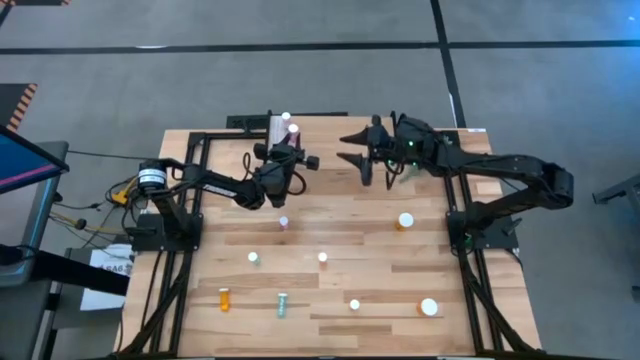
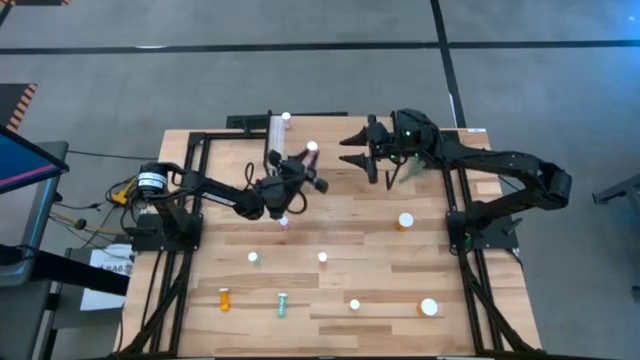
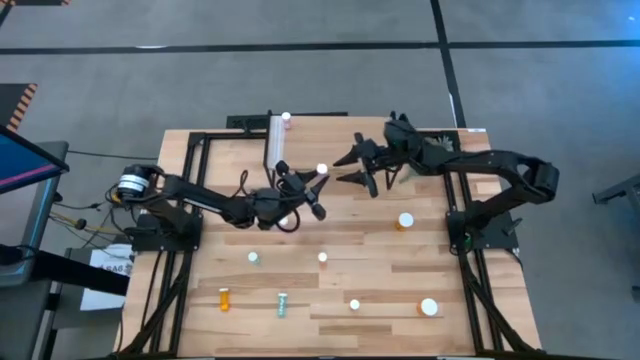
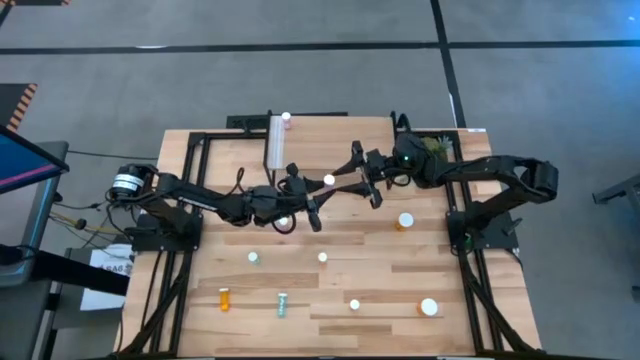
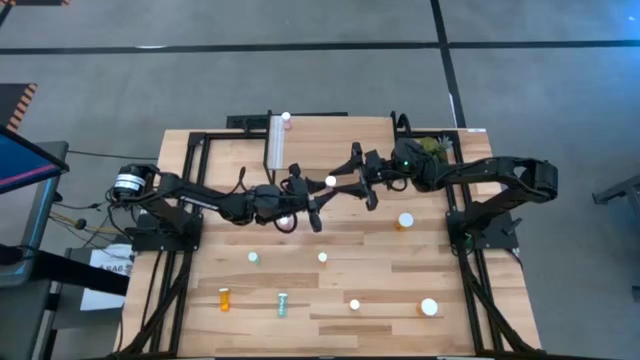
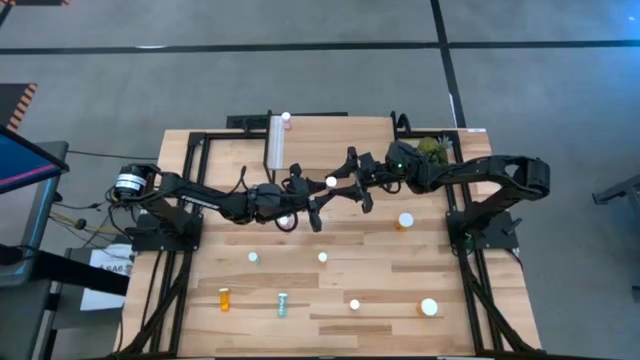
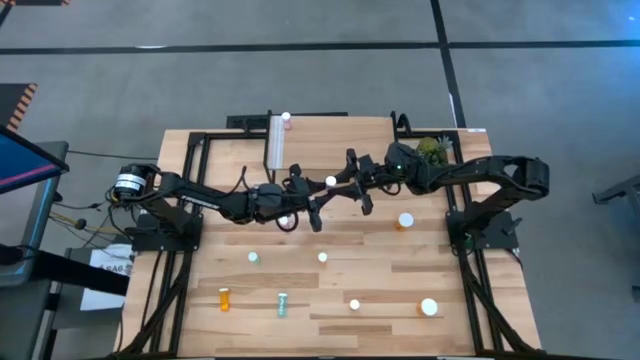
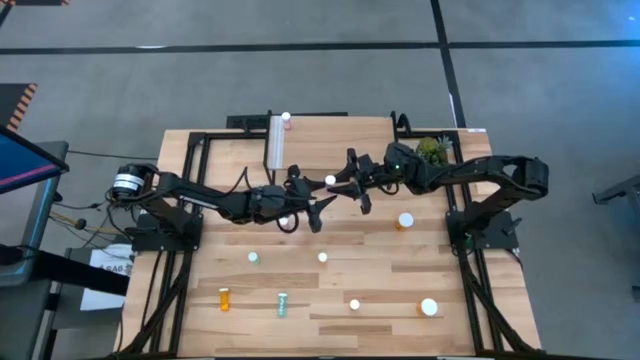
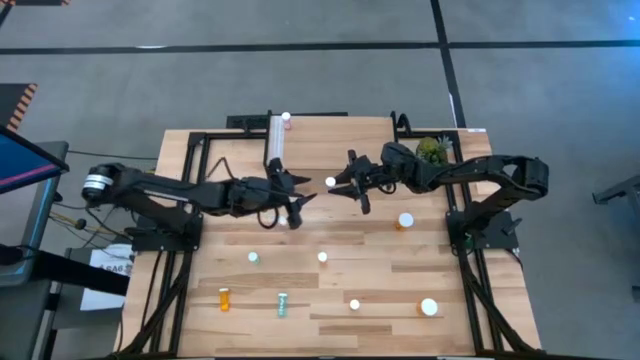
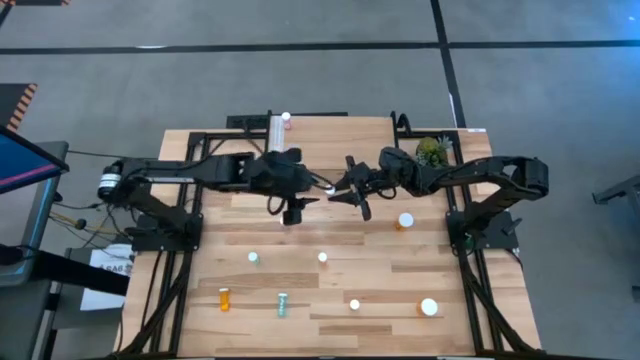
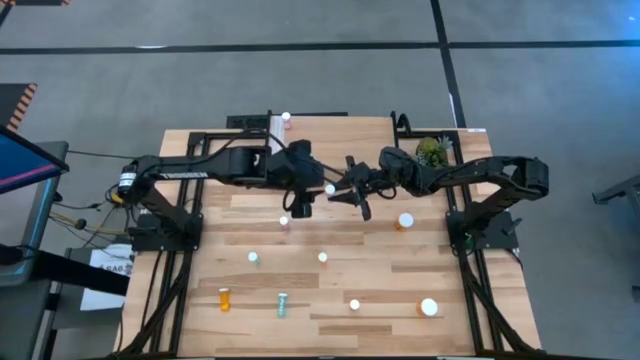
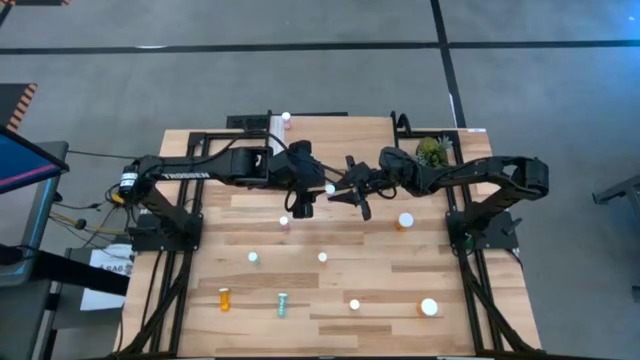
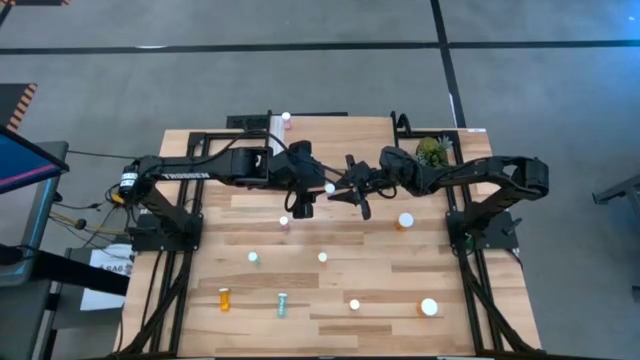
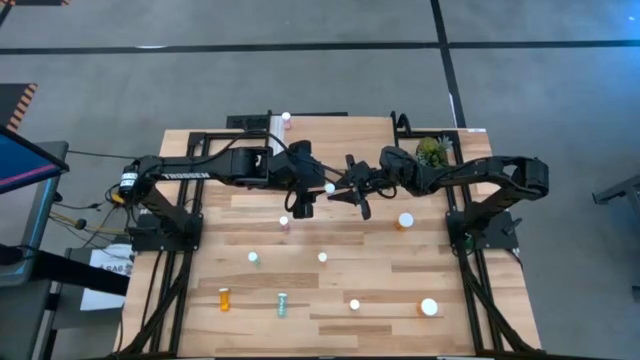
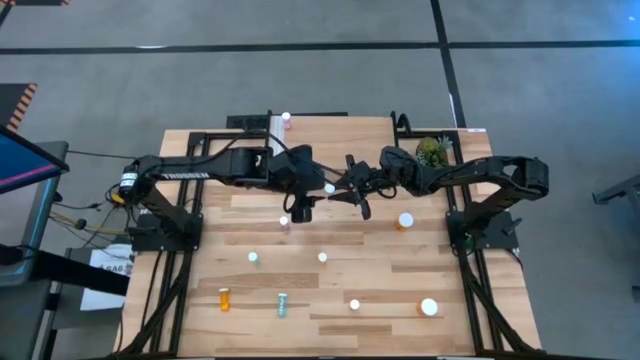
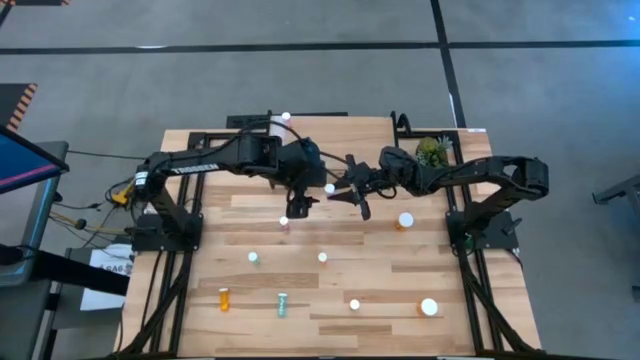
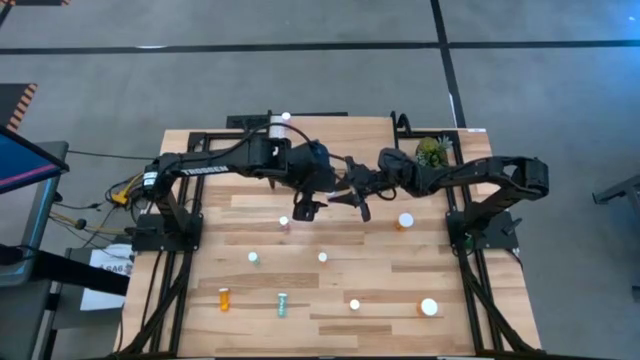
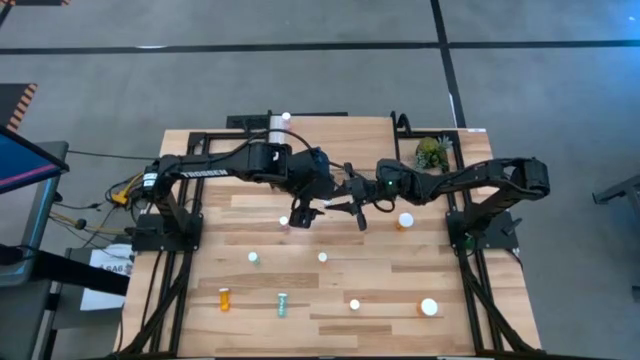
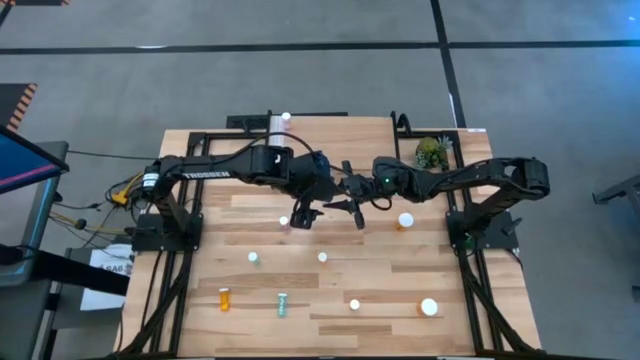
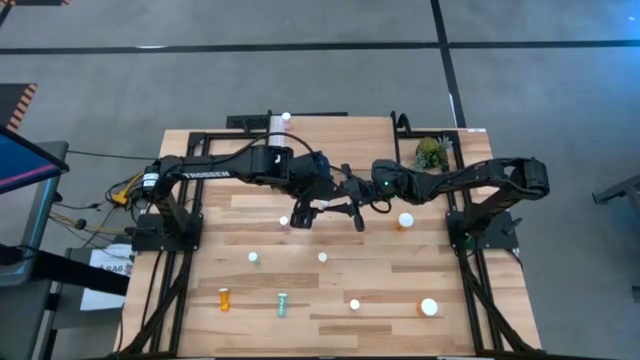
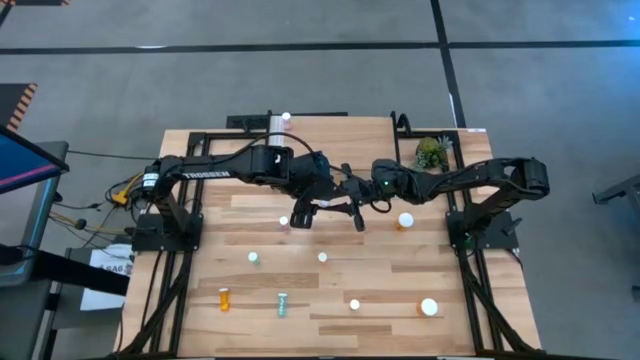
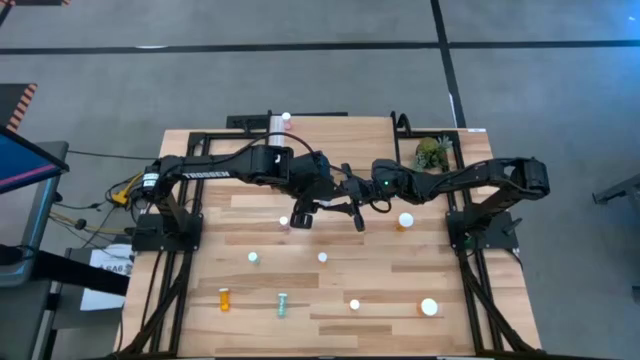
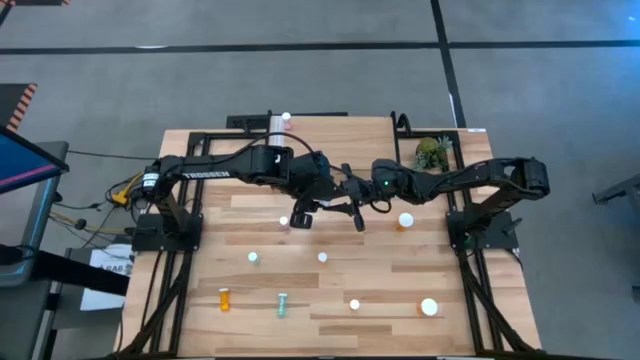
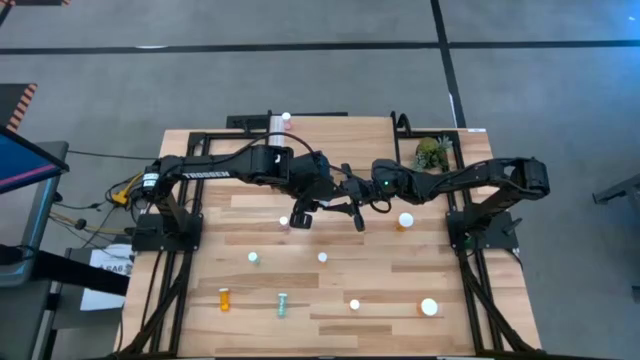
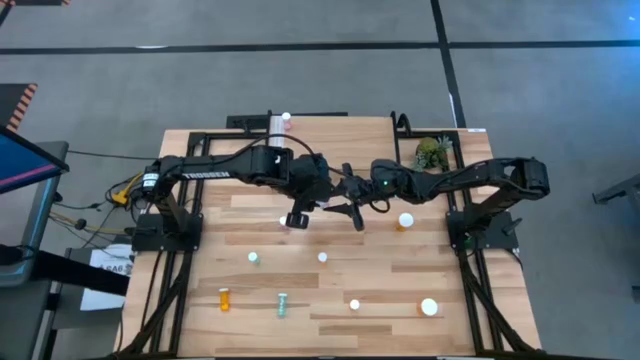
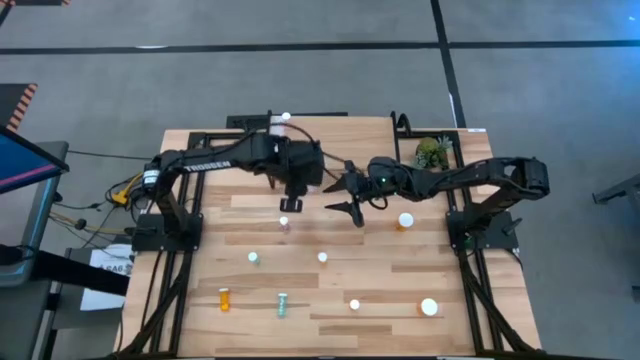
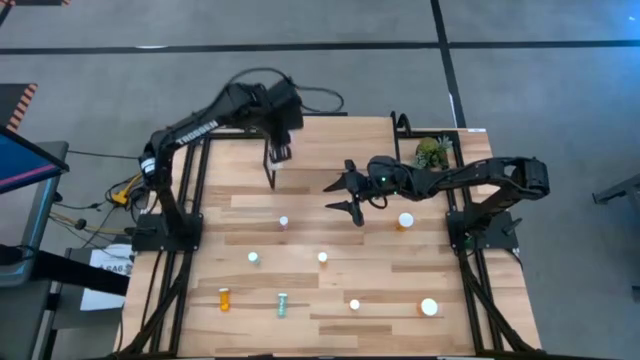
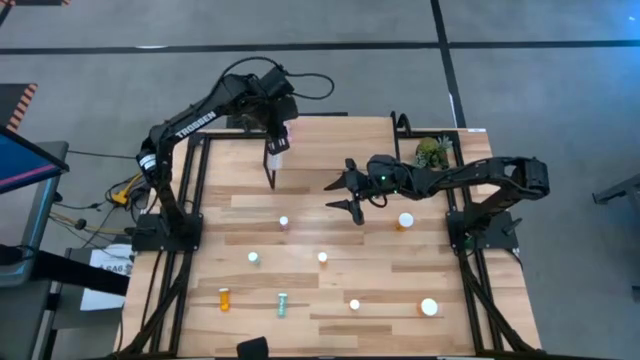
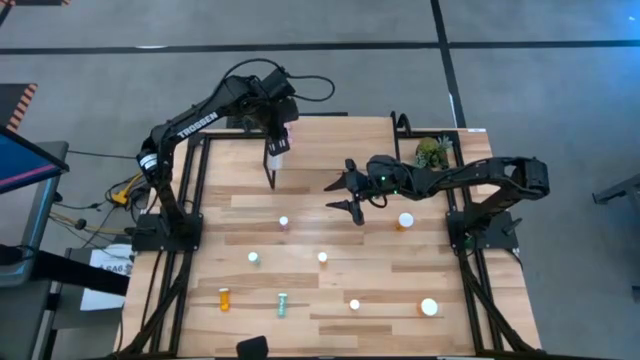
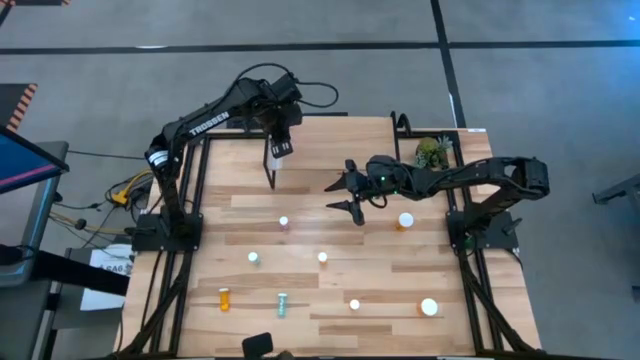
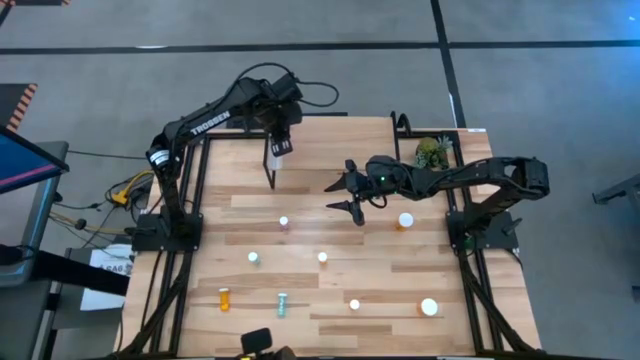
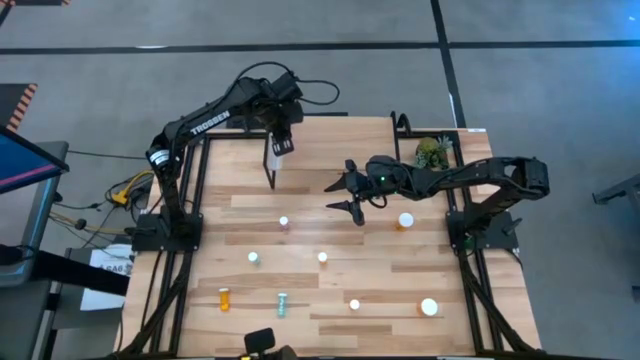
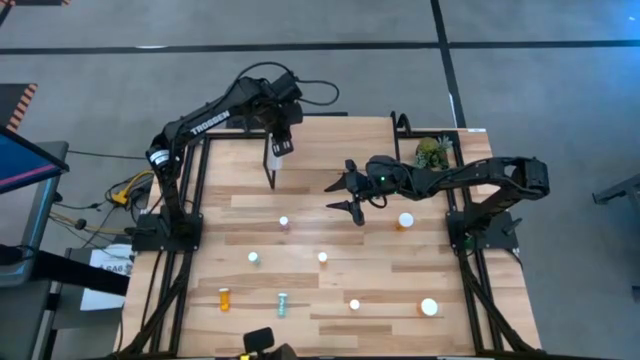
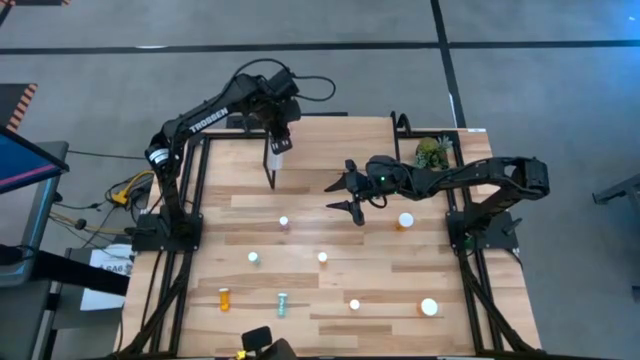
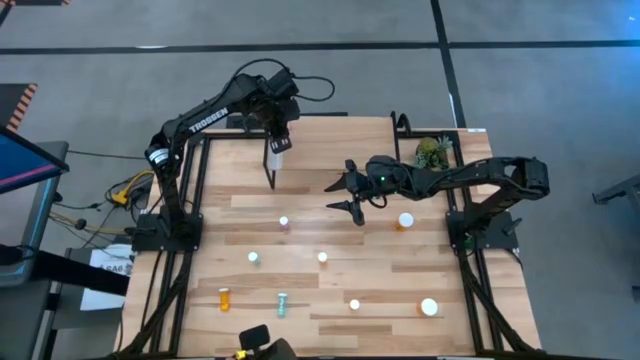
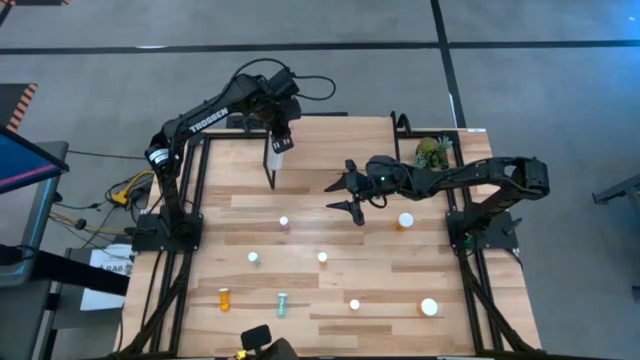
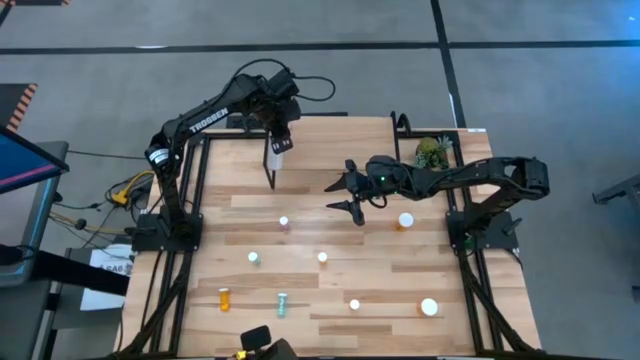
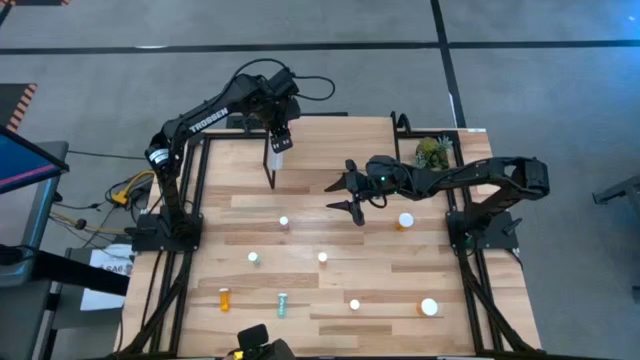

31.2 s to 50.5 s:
Task: Pick and place medicine bottles onto shelf by color
Put the right pink pill bottle on the shelf aligned with the other pink pill bottle

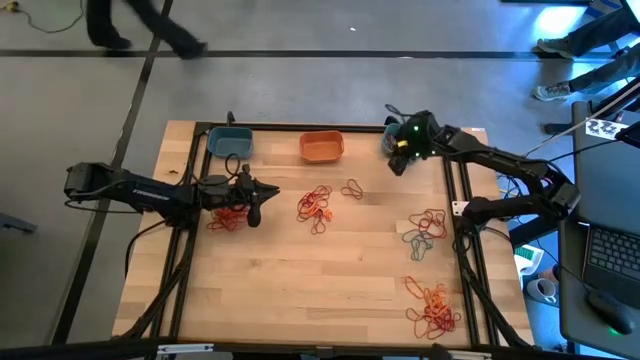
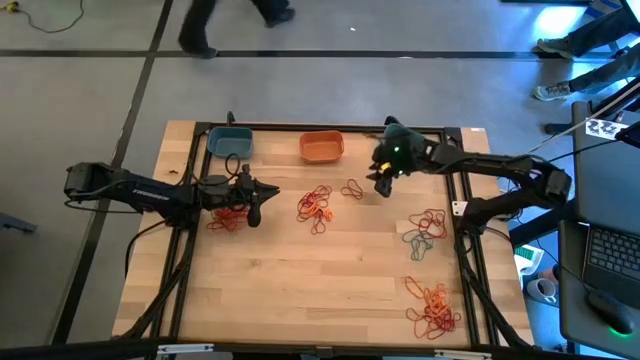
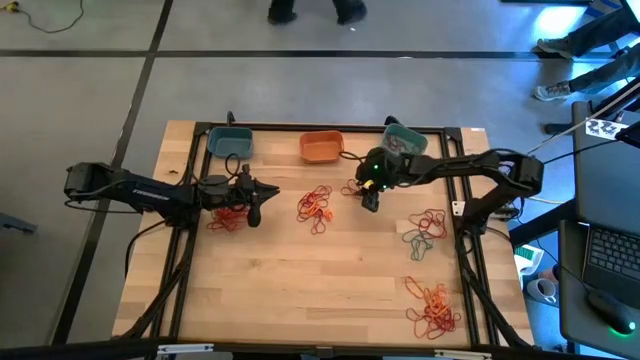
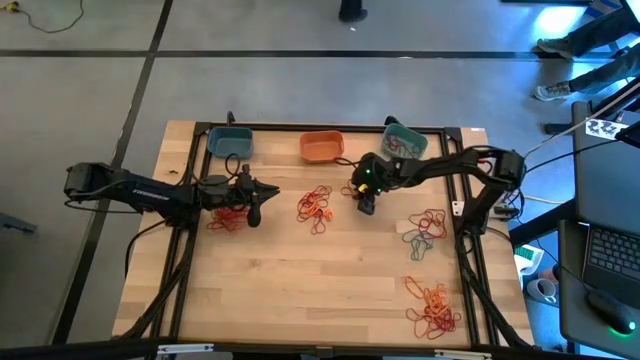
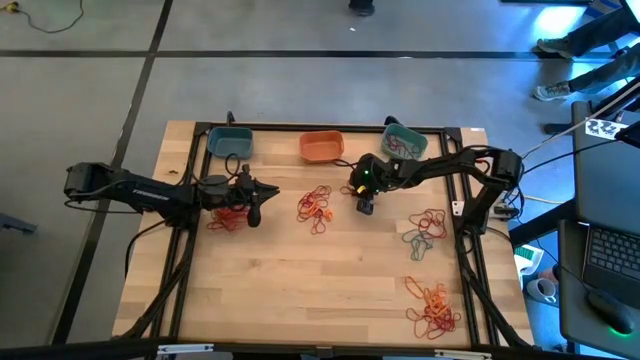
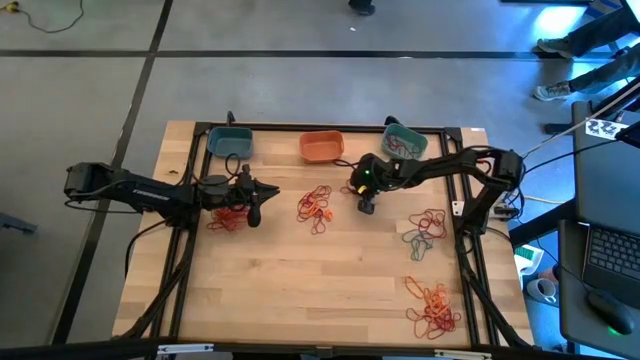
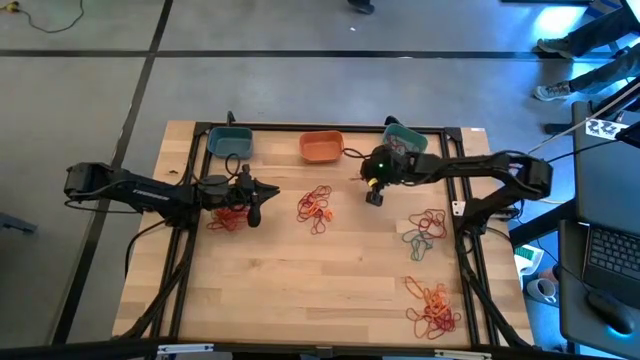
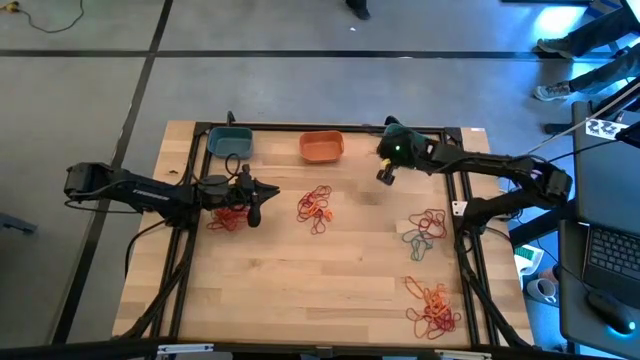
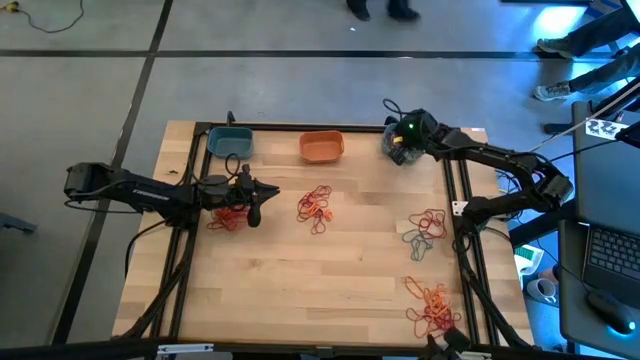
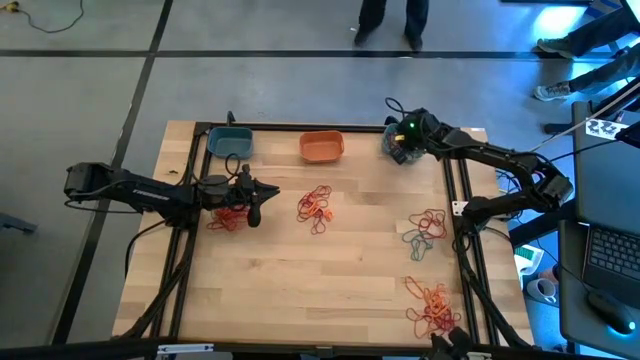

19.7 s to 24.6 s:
Task: Sort rubber bands into baskets
Put the red rubber band into the green bin
